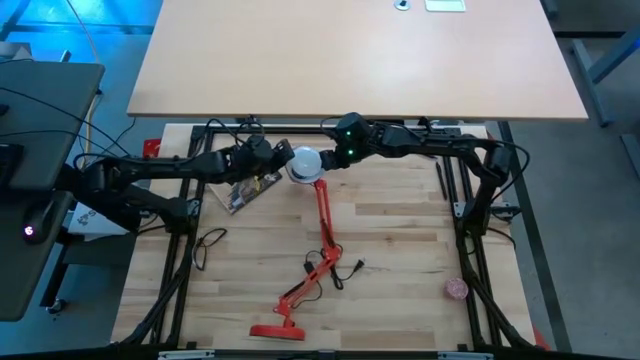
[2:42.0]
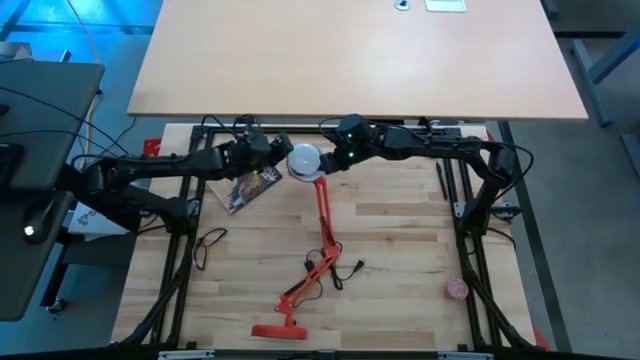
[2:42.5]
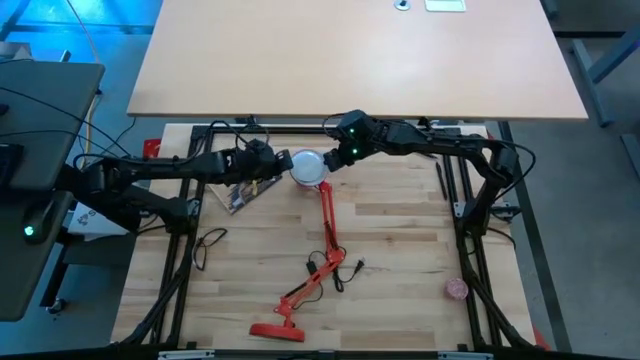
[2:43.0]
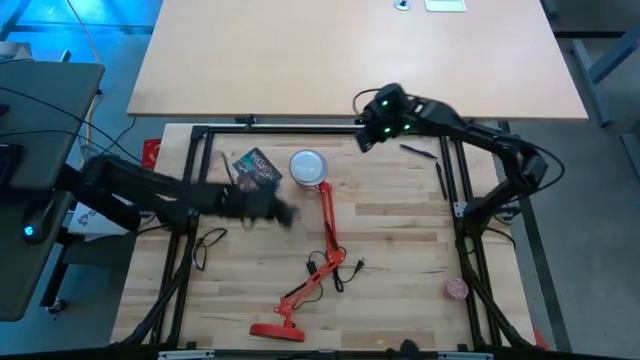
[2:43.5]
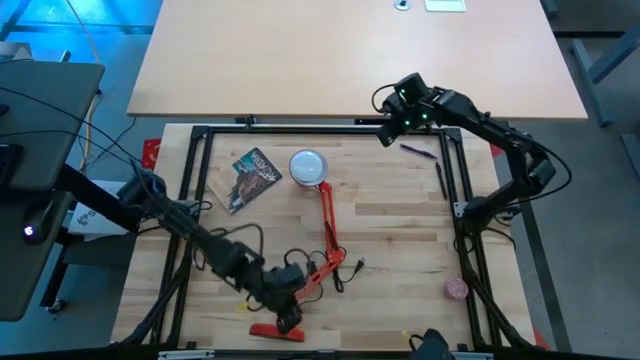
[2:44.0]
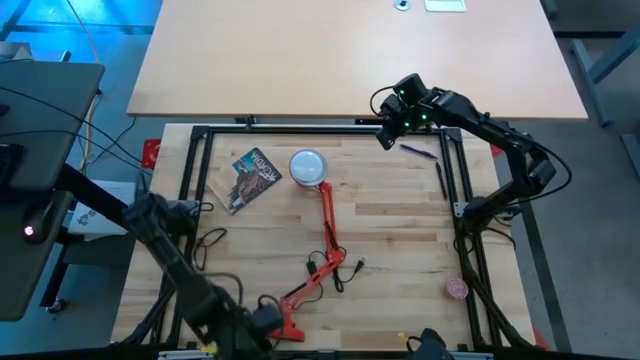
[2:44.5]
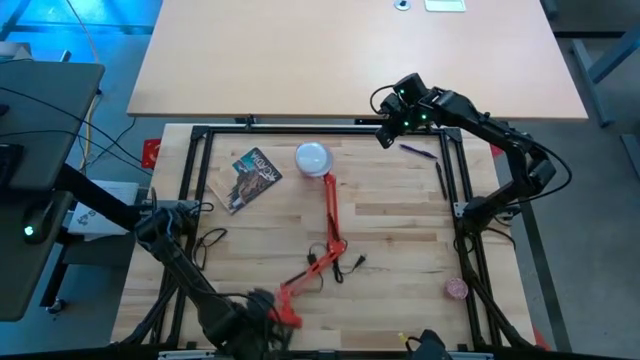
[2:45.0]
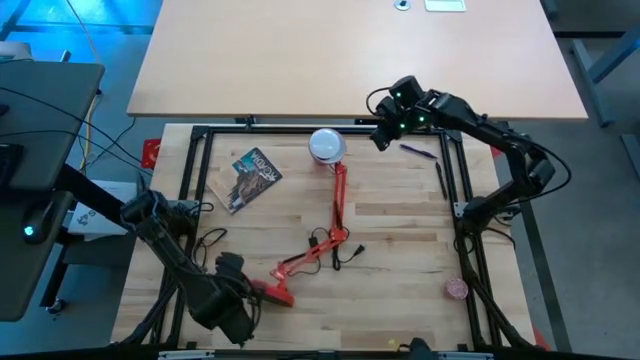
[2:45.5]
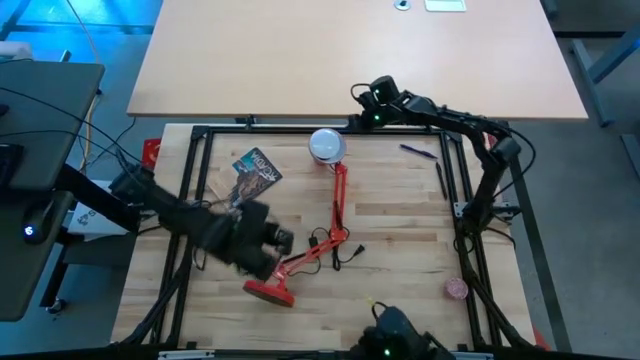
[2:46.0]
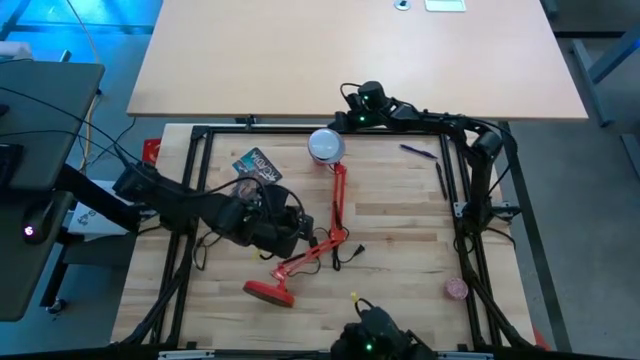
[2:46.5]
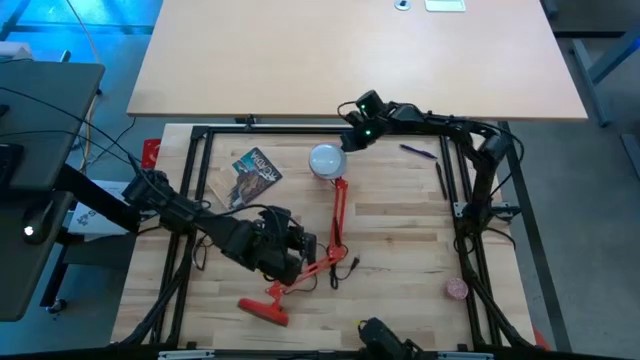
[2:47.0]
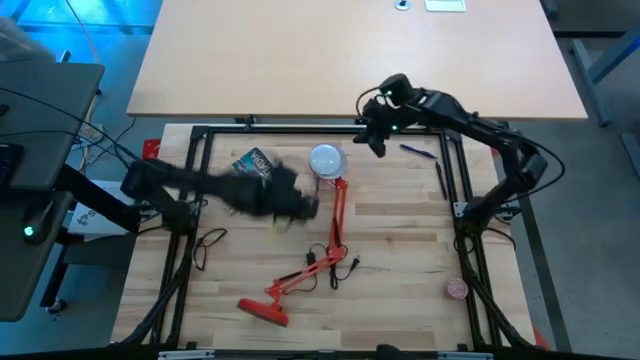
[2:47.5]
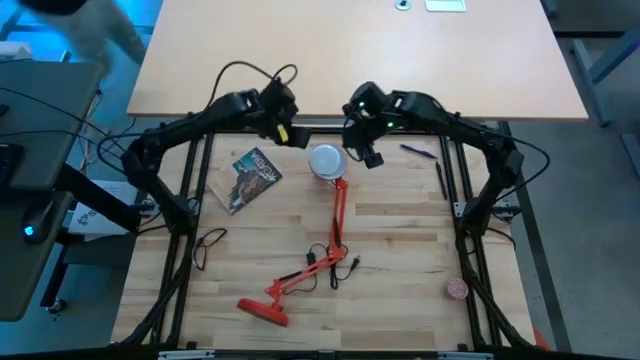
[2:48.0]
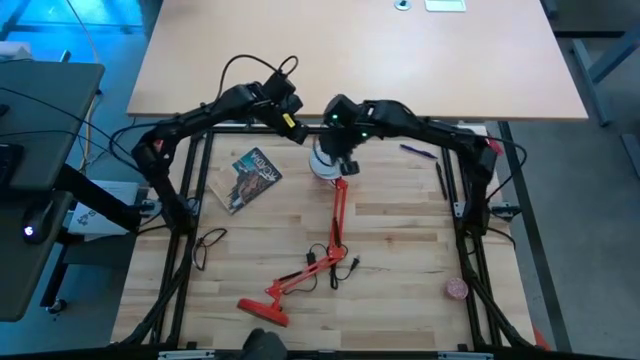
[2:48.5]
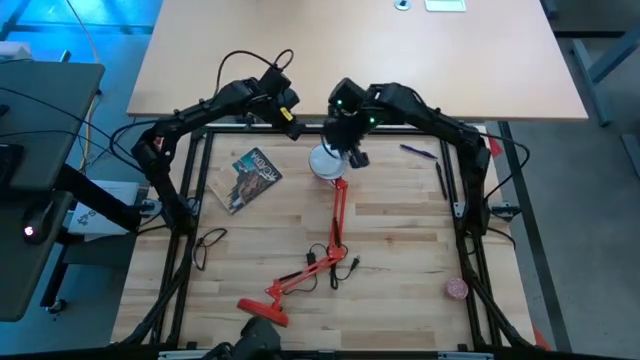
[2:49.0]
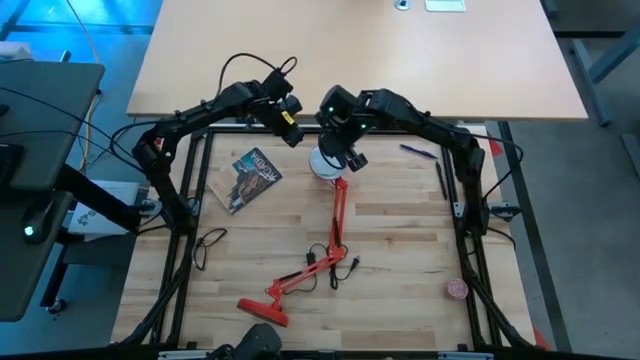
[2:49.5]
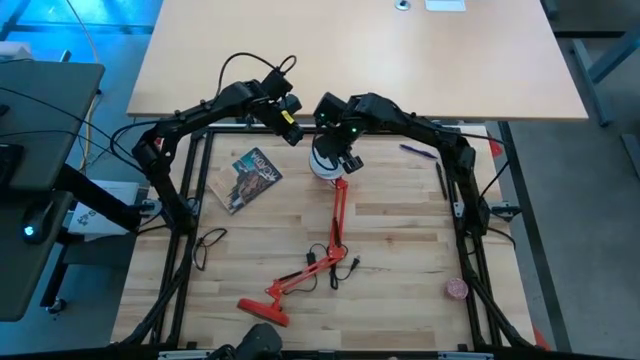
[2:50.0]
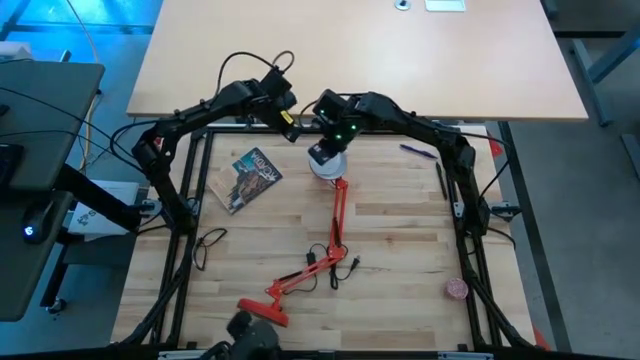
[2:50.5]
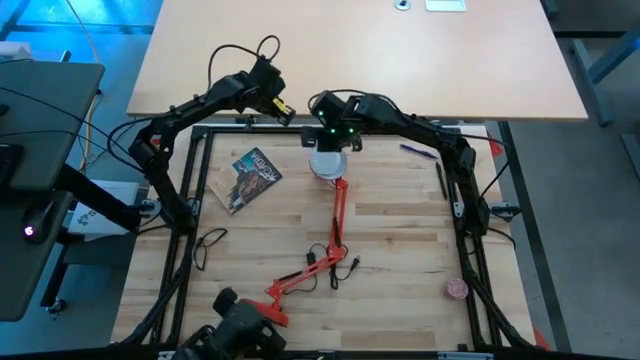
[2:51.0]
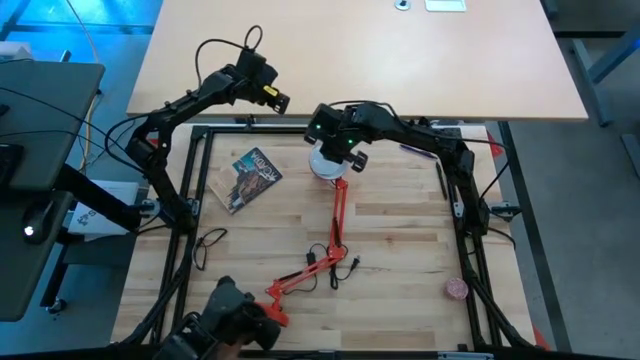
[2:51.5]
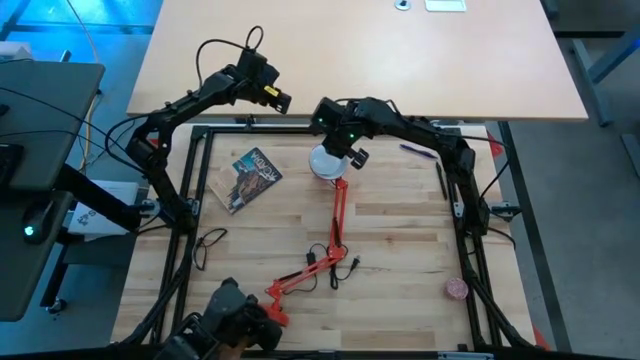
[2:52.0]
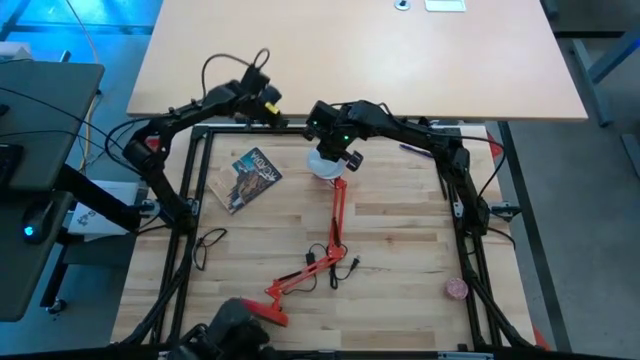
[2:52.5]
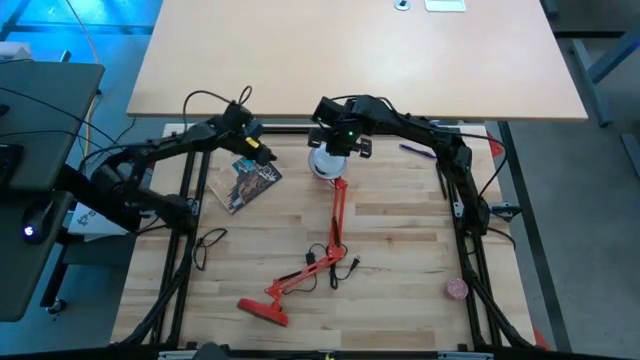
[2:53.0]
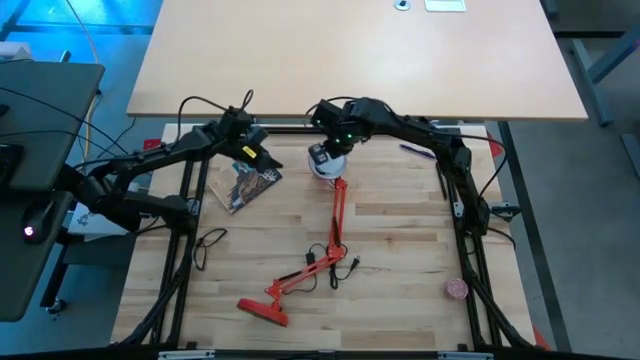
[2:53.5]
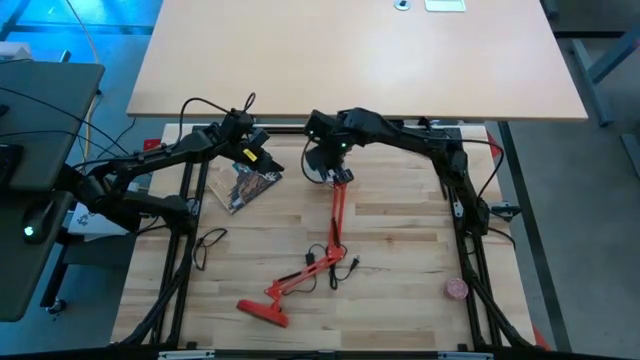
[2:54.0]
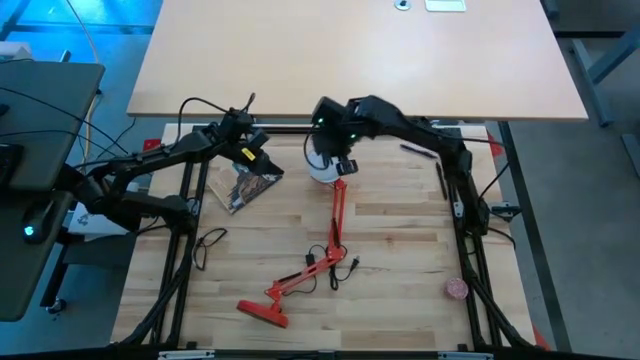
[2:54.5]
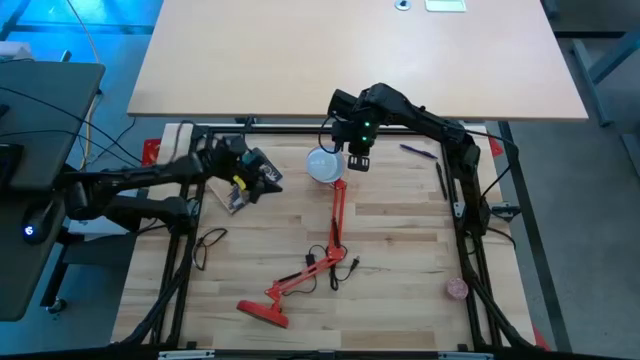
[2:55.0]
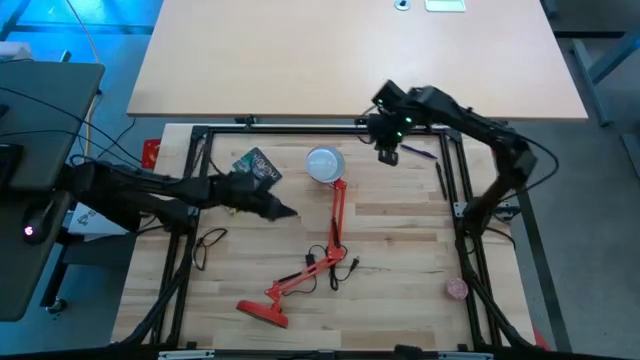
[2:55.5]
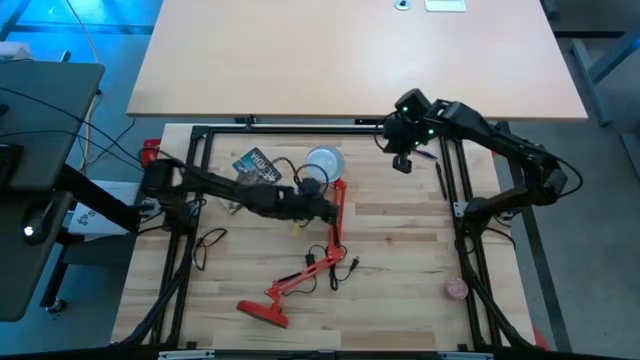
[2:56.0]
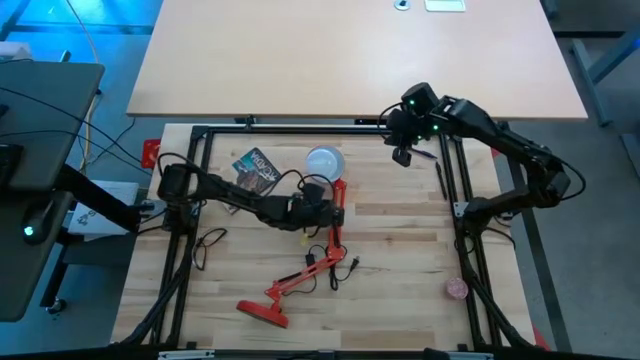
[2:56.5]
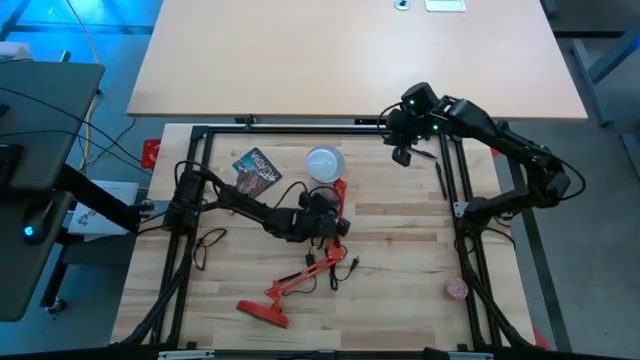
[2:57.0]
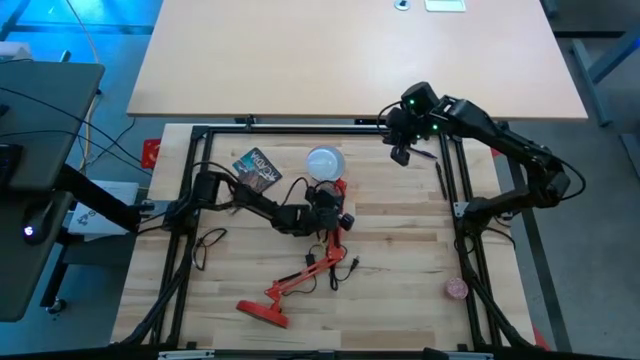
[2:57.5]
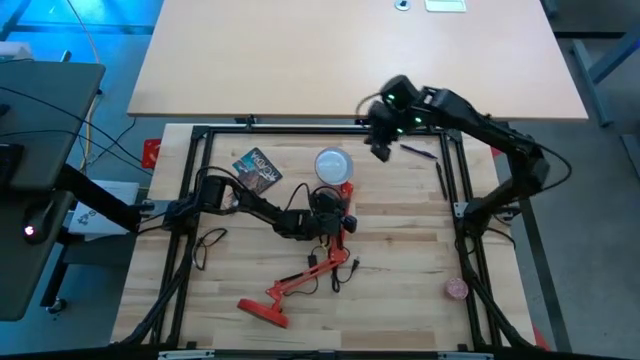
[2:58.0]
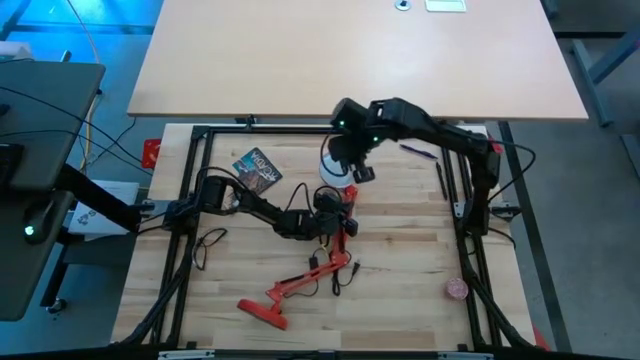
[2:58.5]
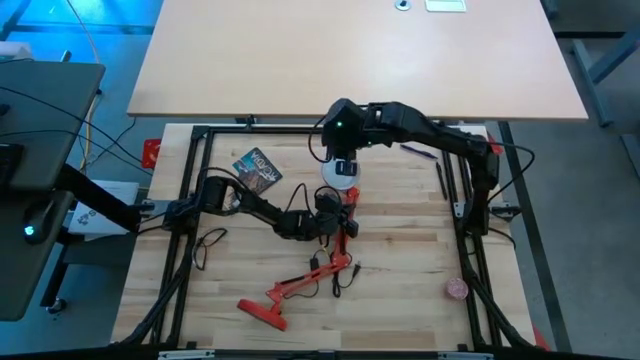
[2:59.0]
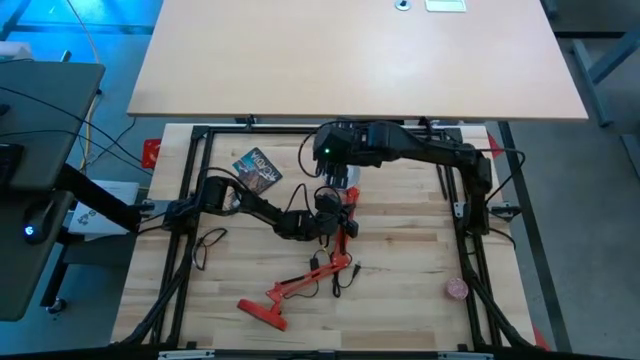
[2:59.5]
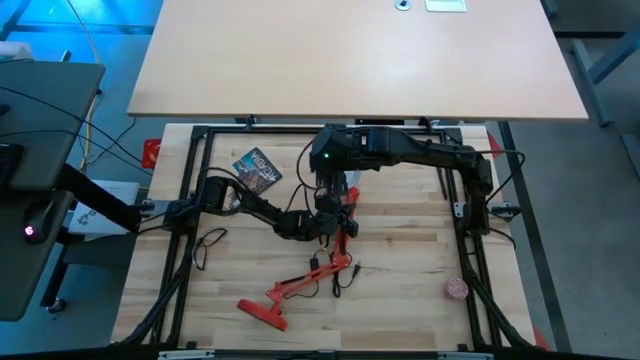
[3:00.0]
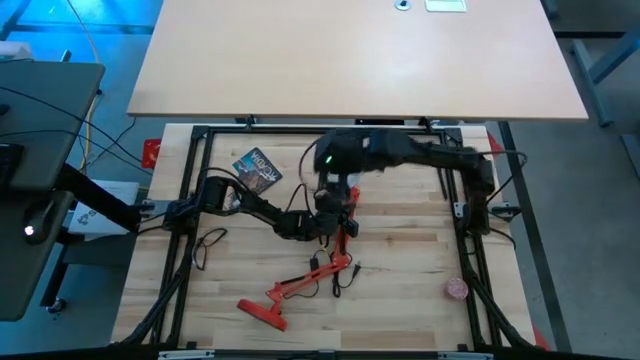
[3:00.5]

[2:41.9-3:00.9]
Task: Screw lightbulb
Remove the lightbulb from the red lamp

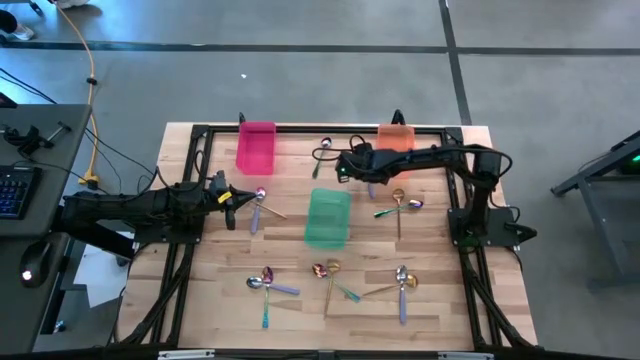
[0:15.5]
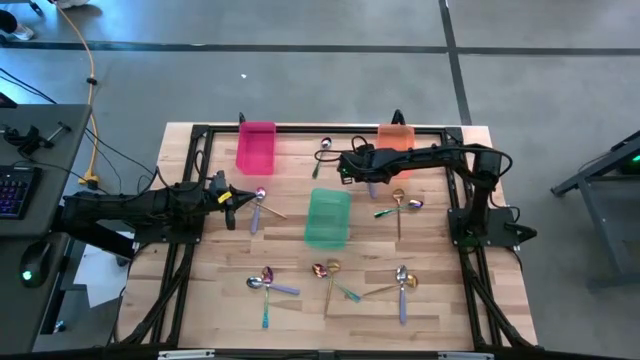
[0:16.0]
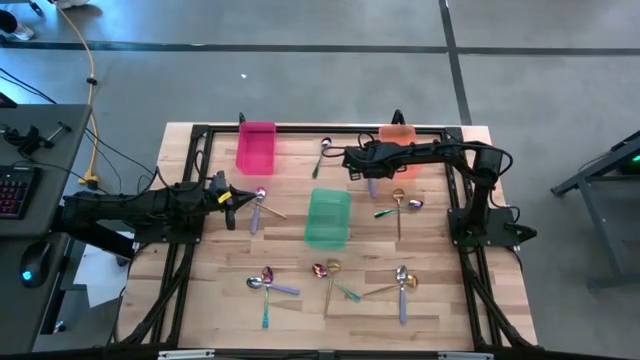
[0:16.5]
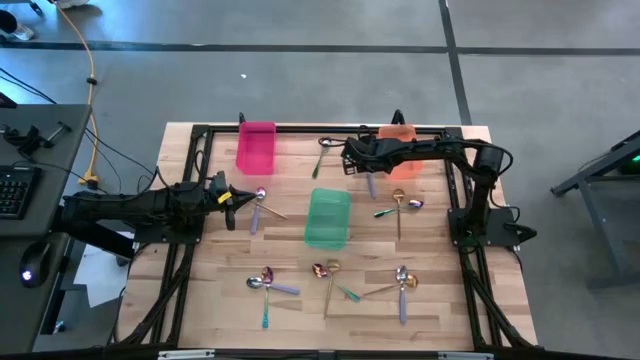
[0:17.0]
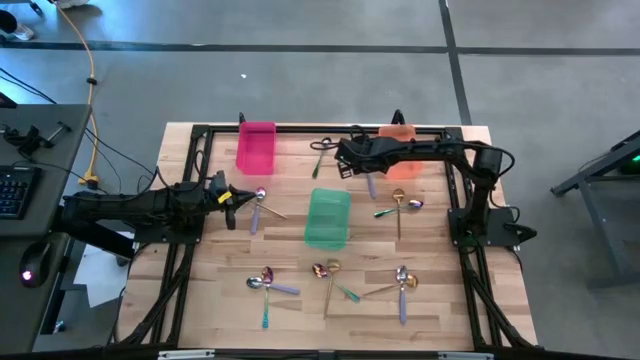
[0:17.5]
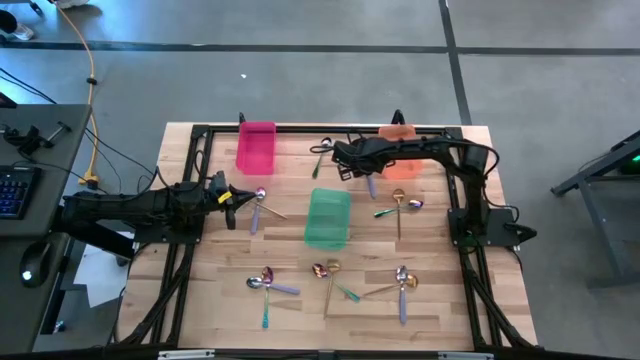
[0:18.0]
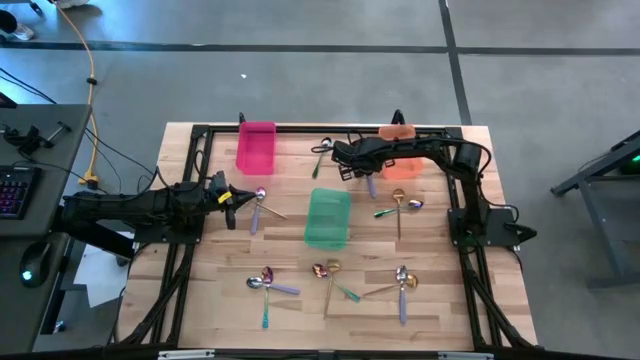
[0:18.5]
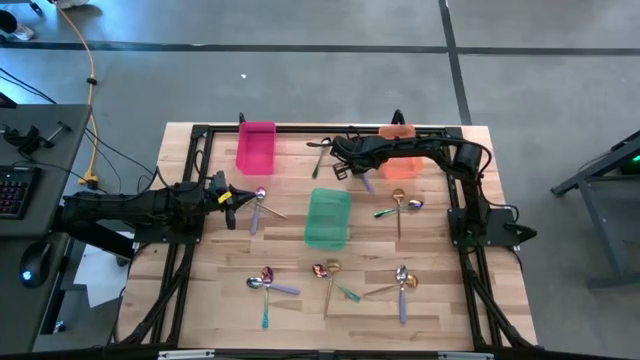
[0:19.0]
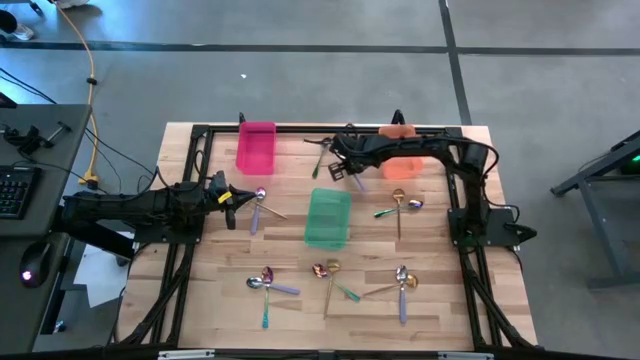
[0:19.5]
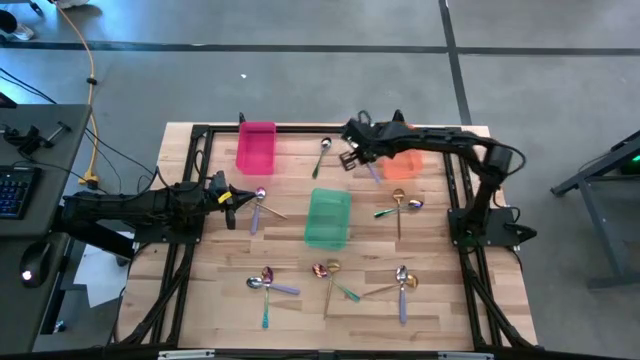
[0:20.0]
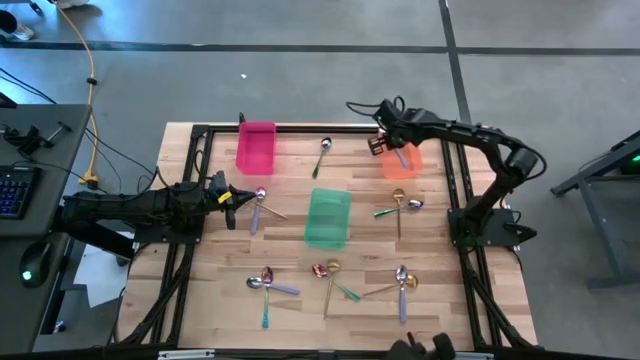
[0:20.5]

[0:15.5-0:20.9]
Task: Sort silverware by color (type)
Put the top center purple spoon into the orange bin
